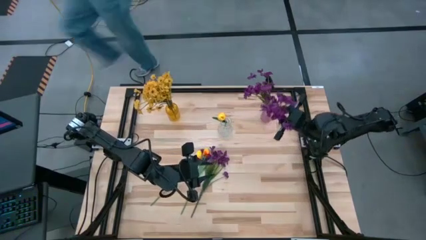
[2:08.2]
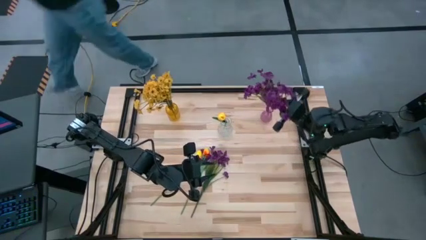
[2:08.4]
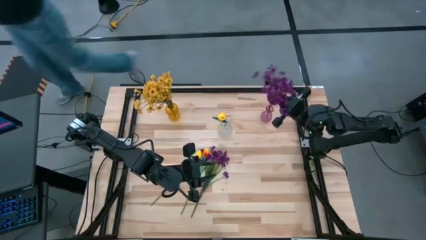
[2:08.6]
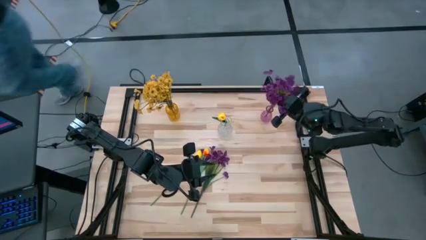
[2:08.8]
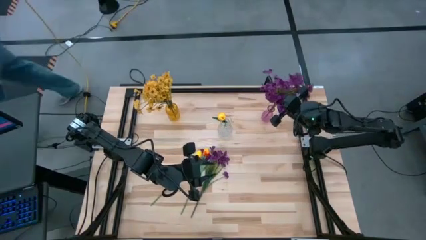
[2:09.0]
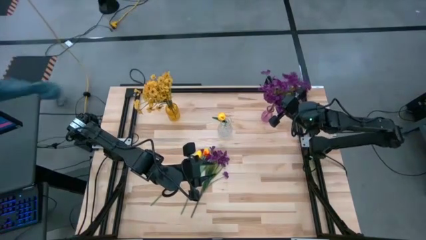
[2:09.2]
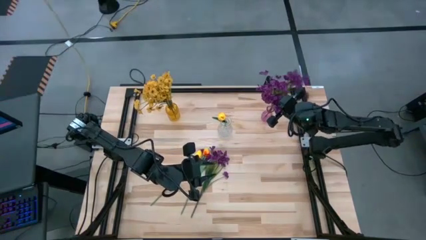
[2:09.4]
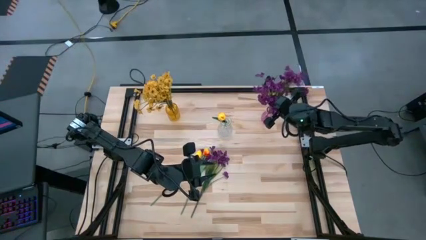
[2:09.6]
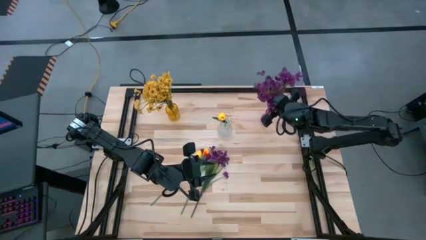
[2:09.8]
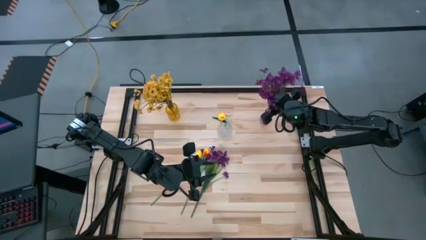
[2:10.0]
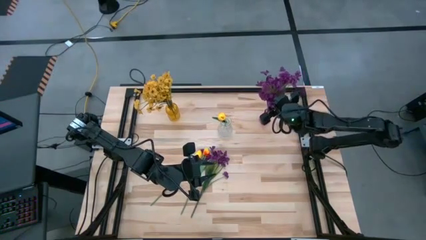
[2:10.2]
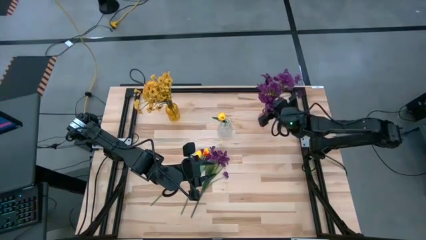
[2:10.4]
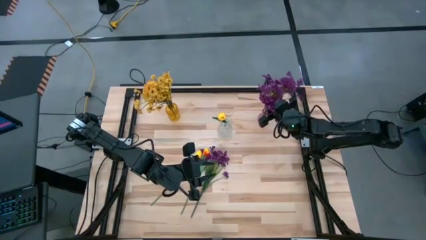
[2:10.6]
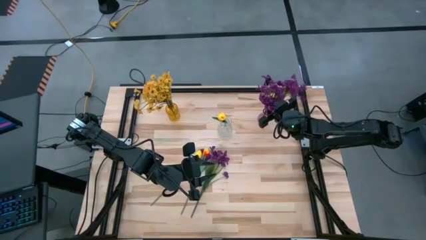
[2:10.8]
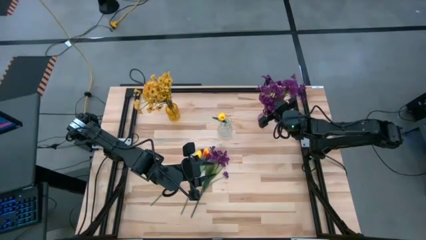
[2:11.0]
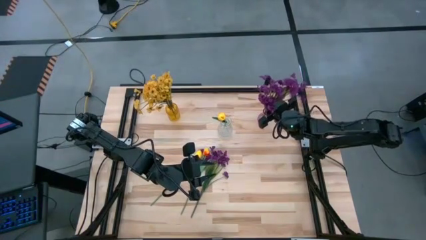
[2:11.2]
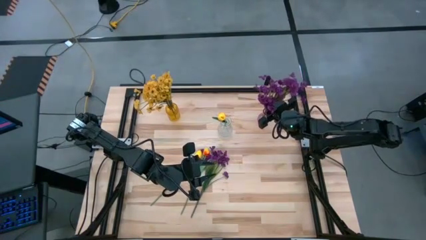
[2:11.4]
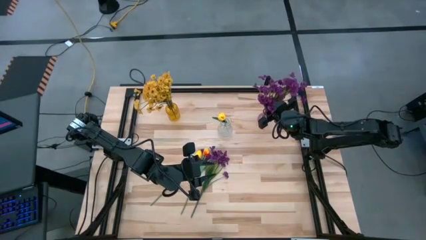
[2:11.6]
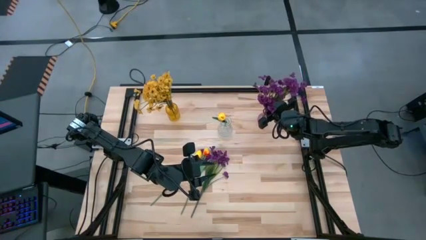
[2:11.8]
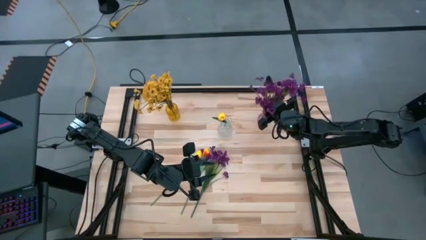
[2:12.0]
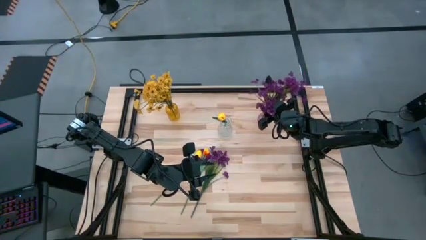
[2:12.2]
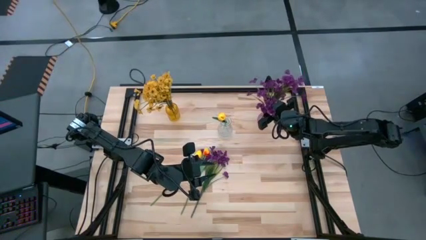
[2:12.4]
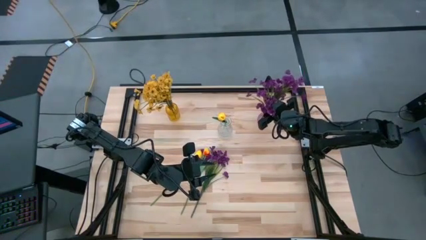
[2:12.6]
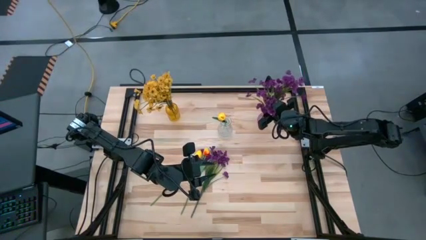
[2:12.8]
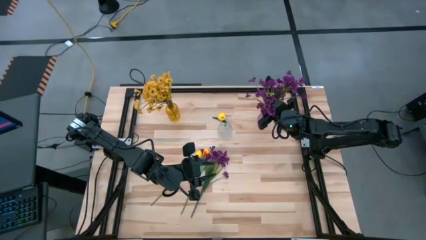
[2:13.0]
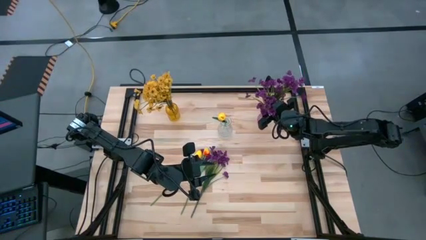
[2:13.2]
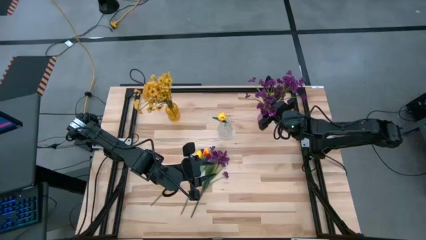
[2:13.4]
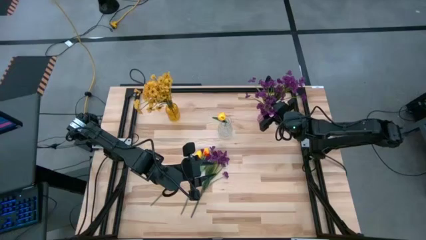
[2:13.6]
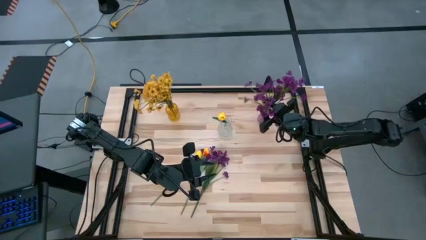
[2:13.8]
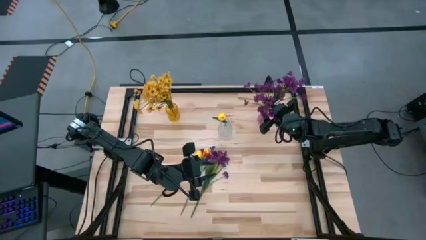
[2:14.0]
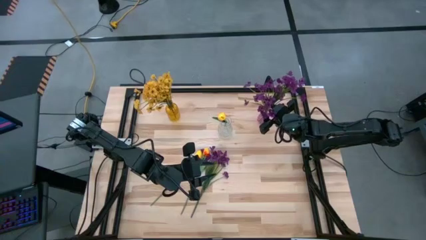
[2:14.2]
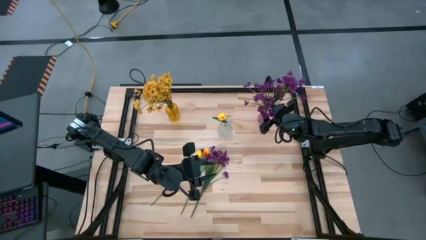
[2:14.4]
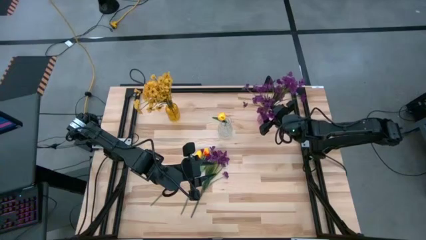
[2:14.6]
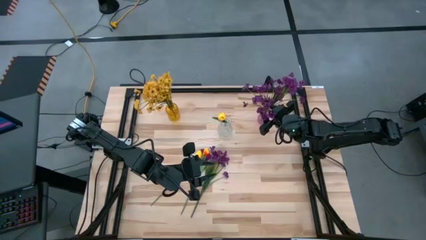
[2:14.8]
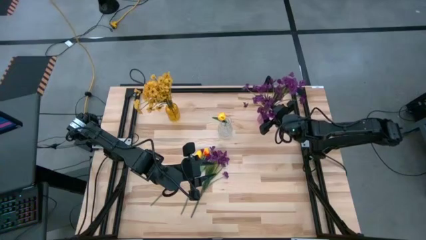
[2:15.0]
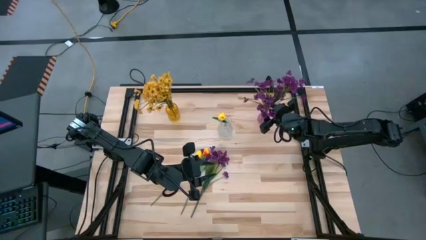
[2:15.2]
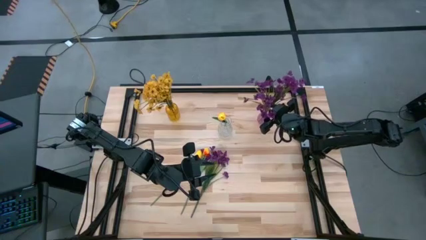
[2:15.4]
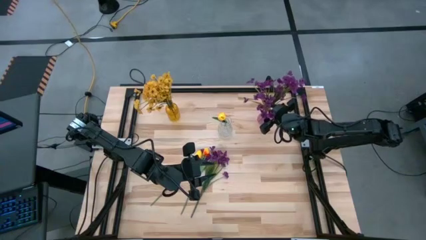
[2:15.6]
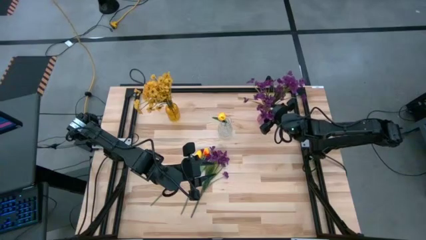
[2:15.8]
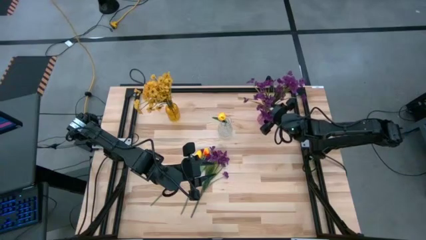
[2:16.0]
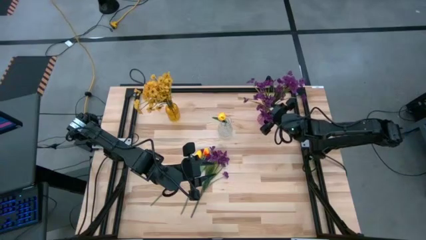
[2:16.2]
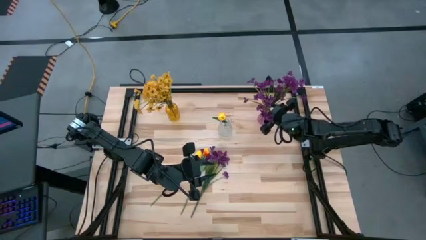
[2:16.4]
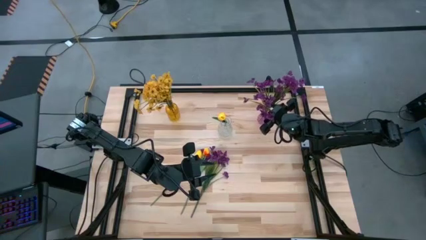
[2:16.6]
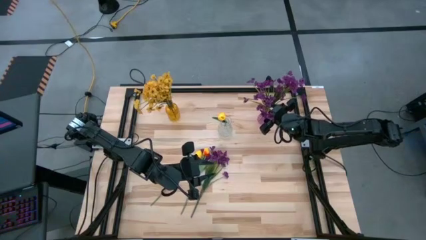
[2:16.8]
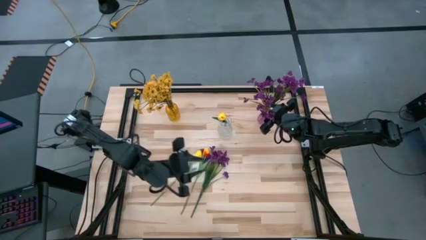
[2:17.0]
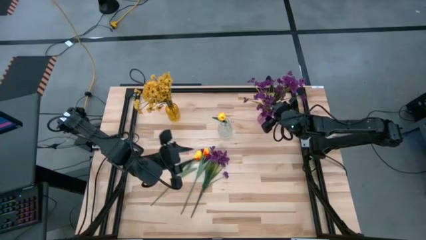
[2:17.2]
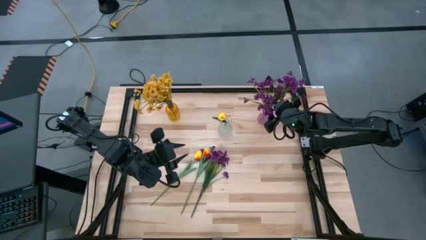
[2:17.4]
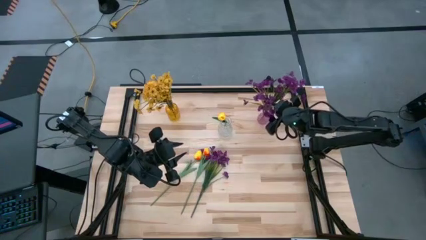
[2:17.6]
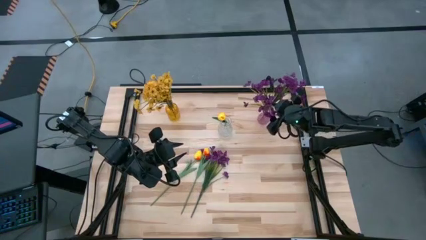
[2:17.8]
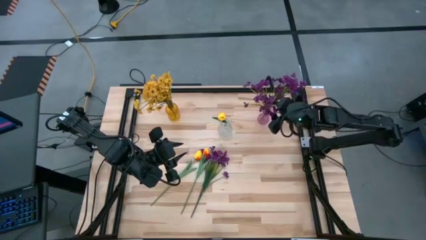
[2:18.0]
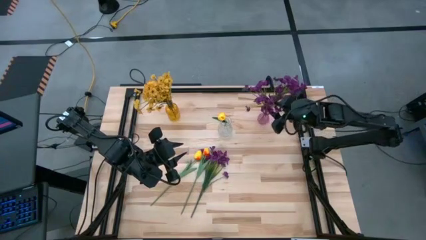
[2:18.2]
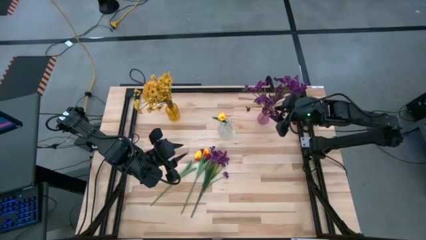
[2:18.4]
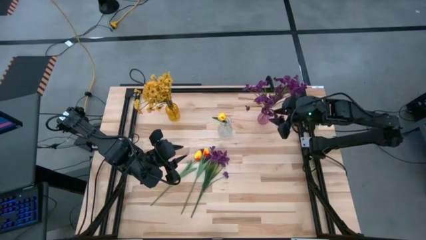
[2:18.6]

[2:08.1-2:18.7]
Task: Sort flowers into vase by color
Put the violet flowers into the pink vase
